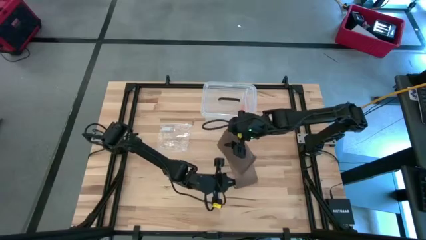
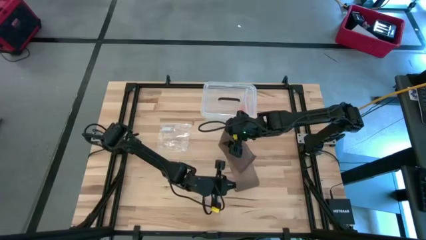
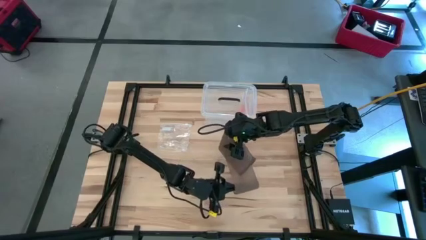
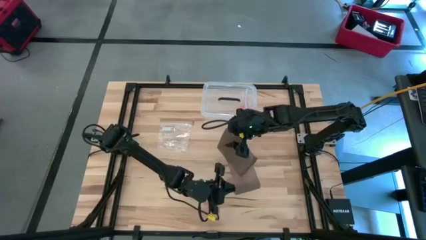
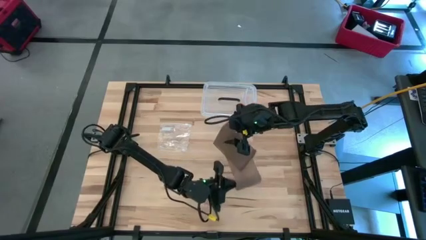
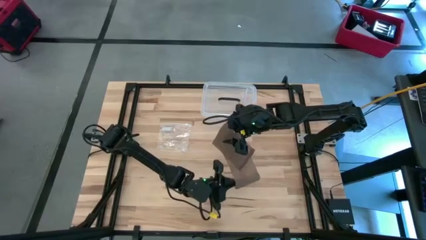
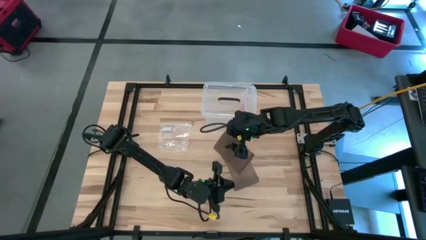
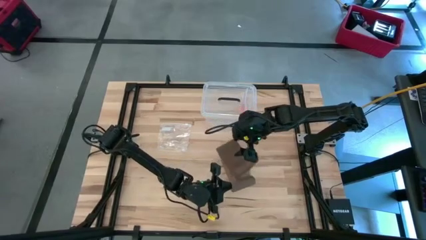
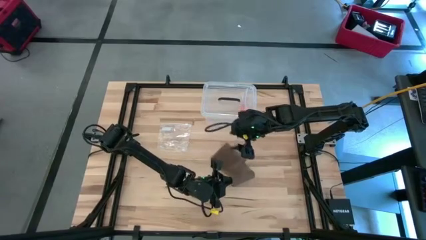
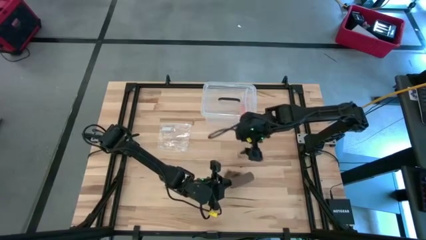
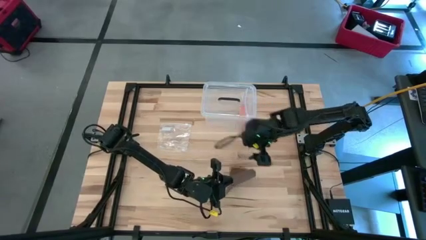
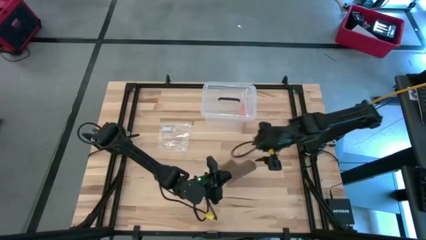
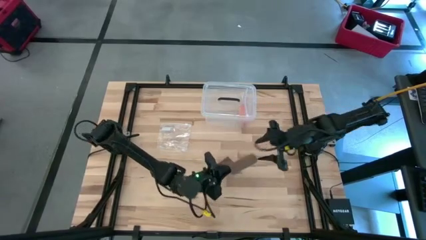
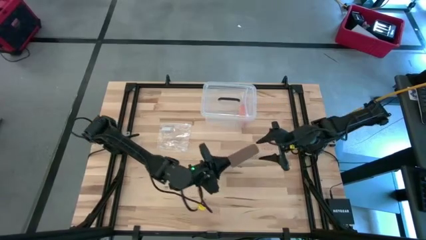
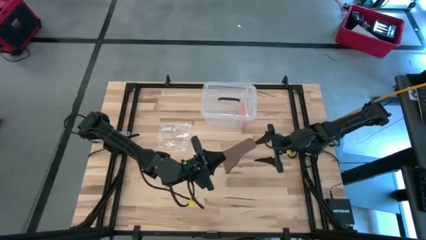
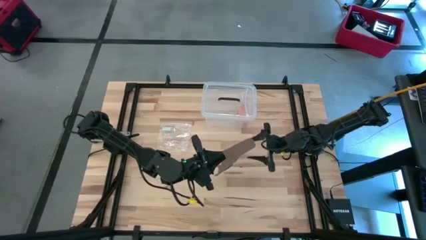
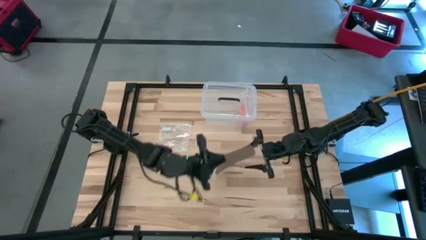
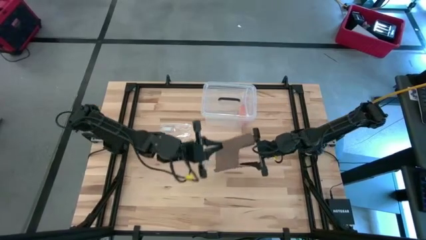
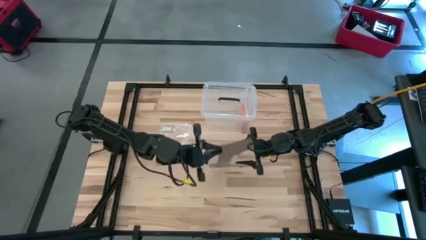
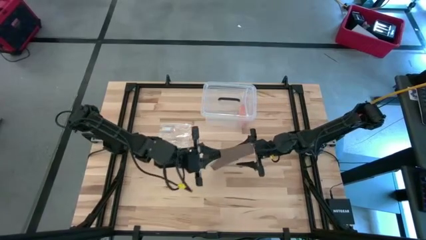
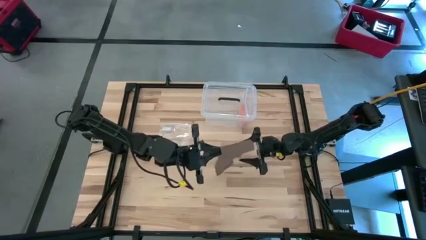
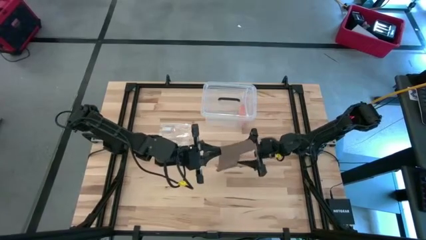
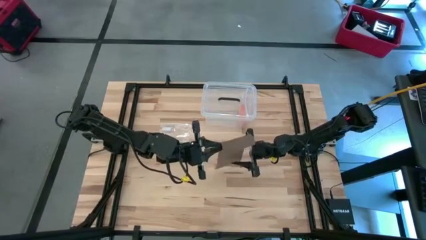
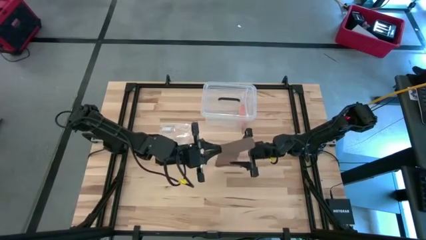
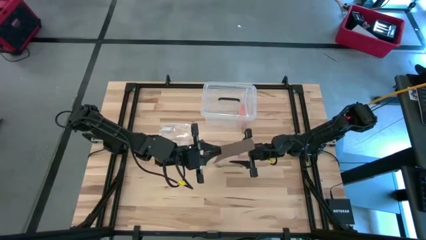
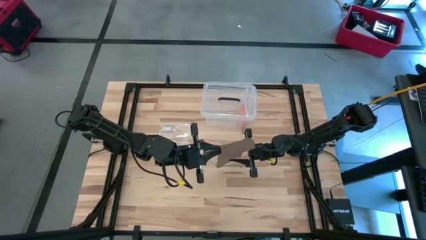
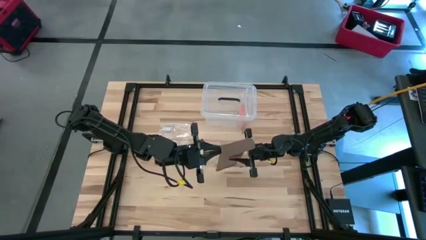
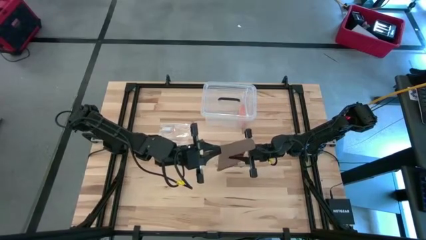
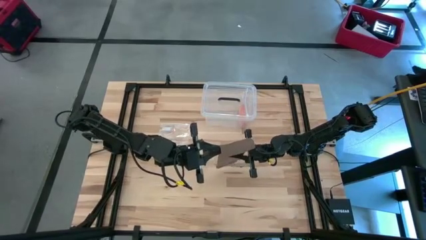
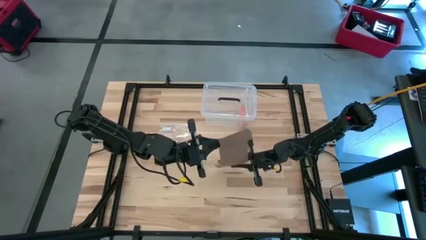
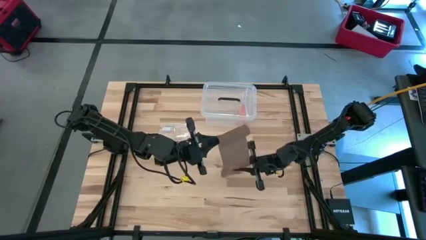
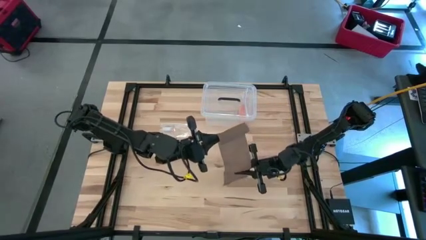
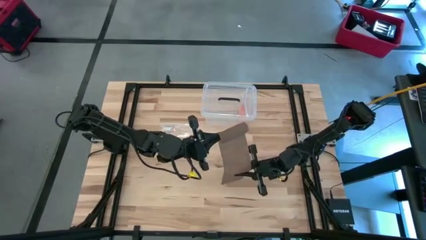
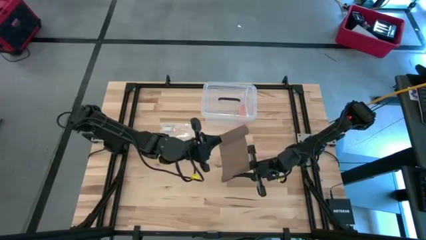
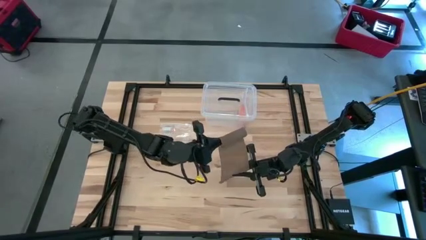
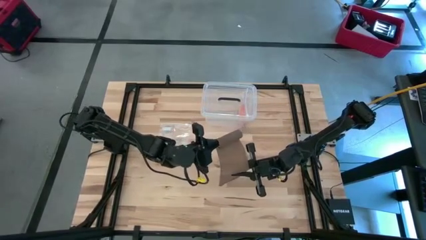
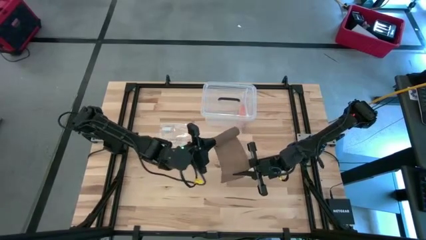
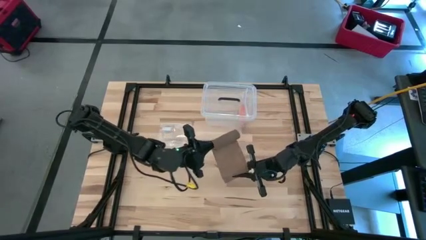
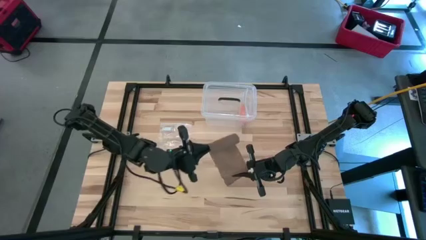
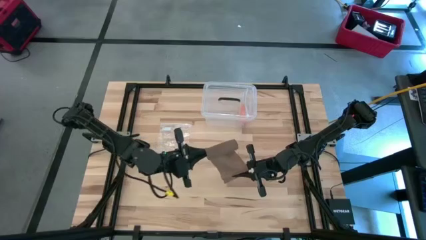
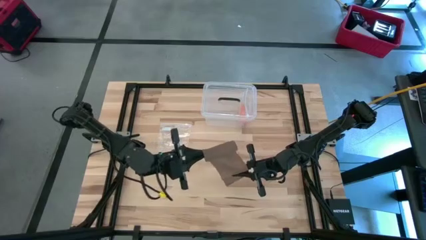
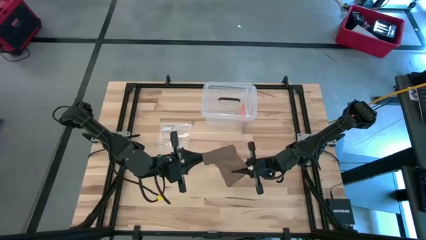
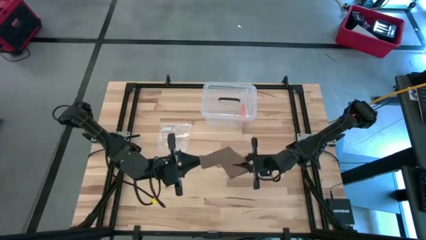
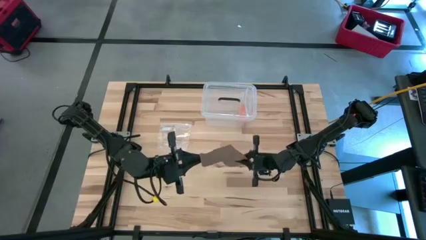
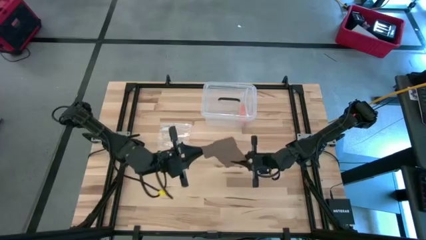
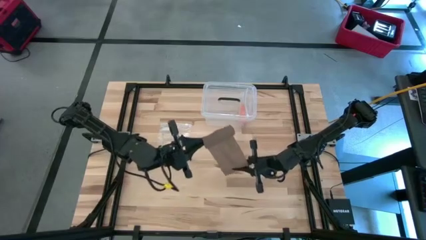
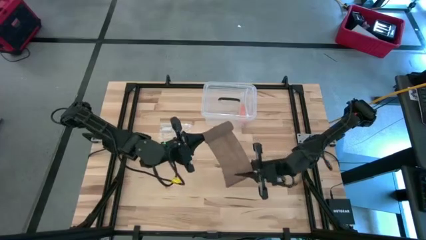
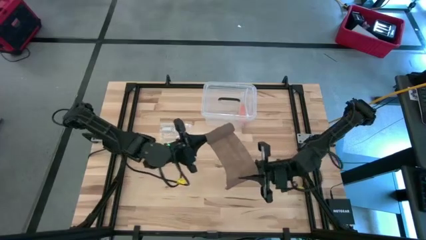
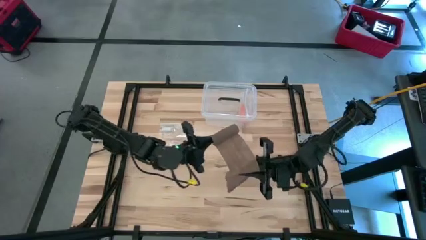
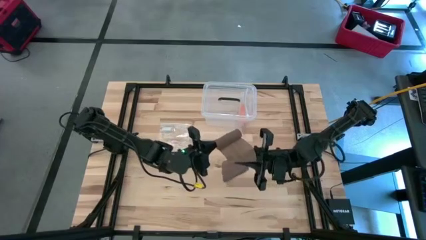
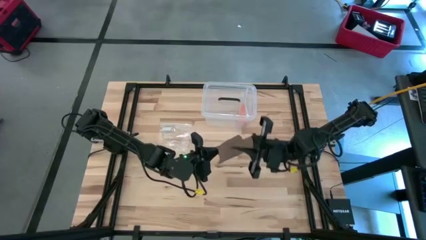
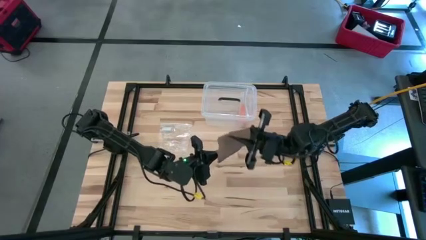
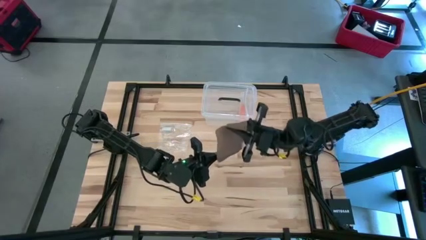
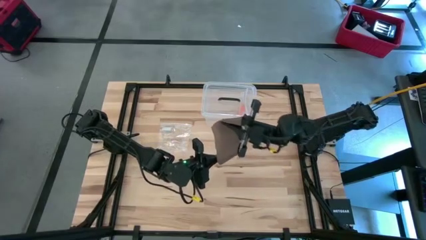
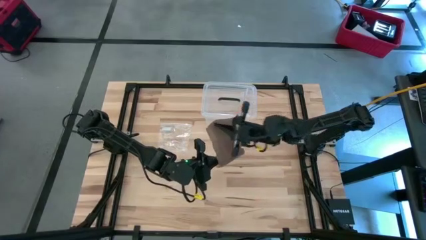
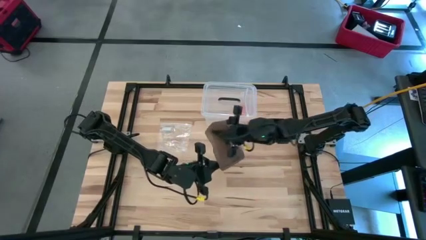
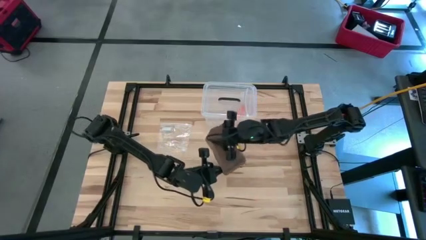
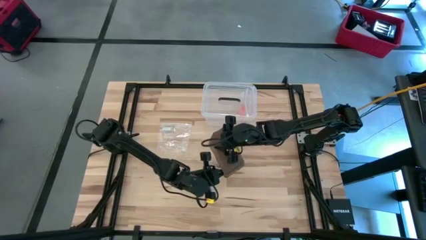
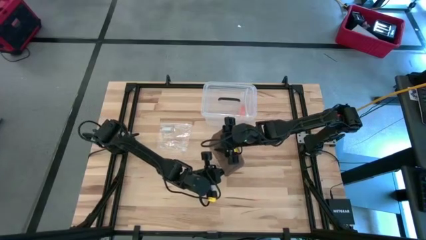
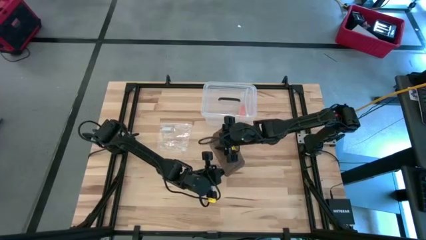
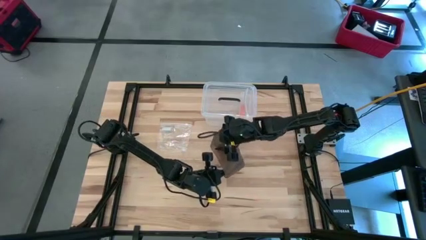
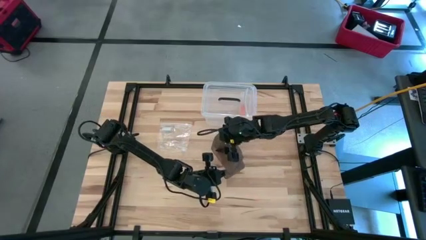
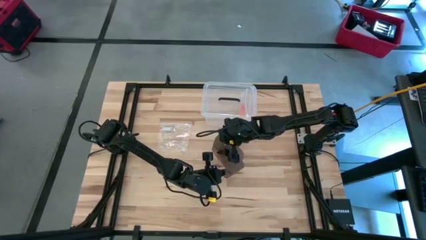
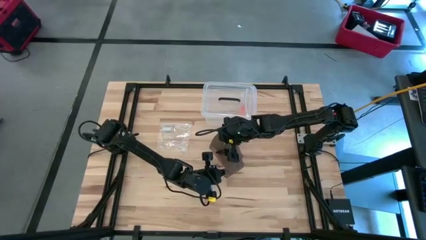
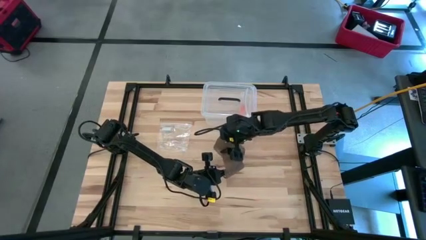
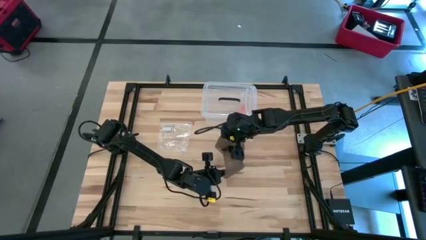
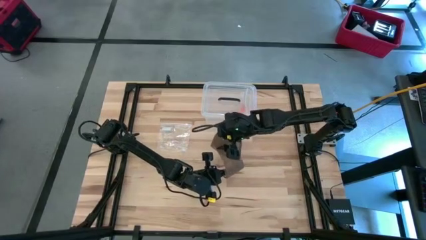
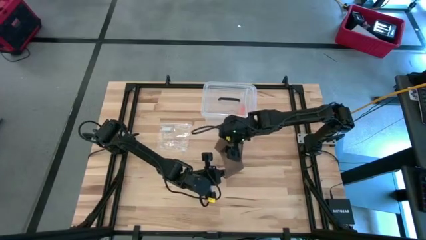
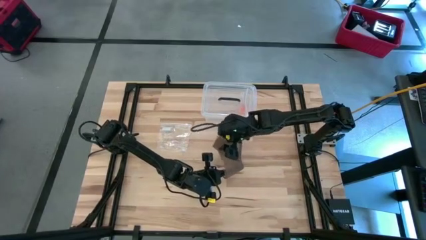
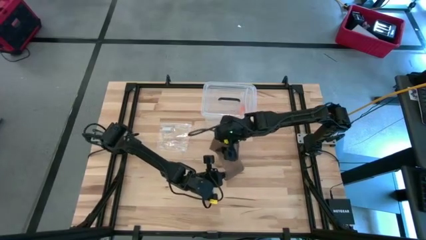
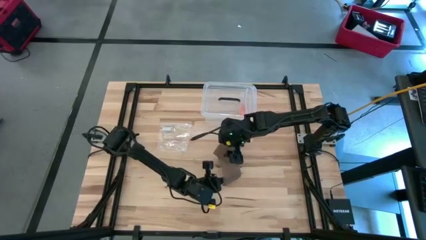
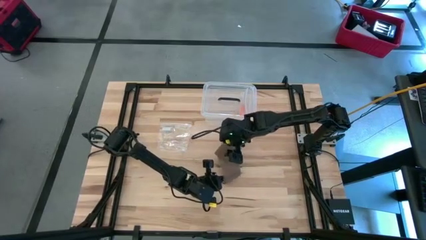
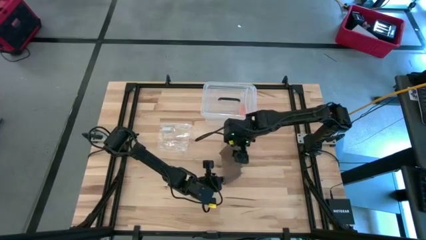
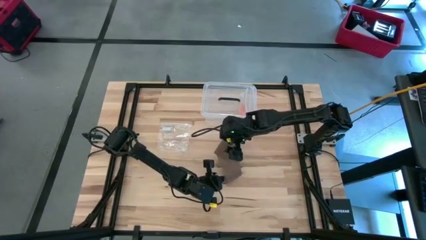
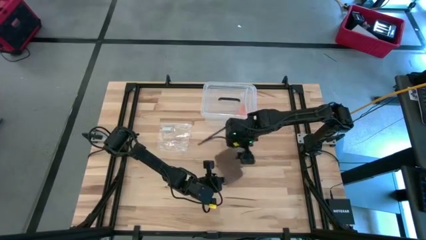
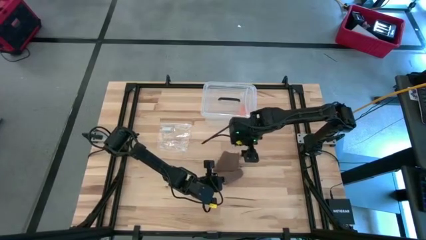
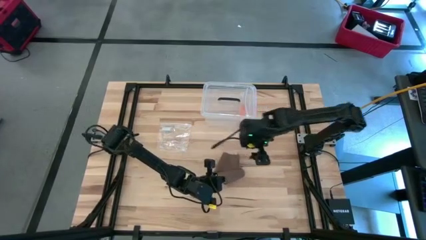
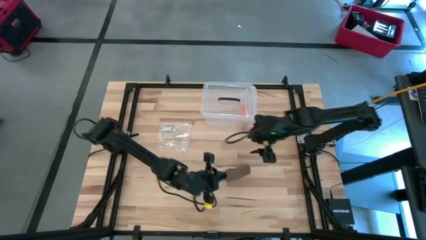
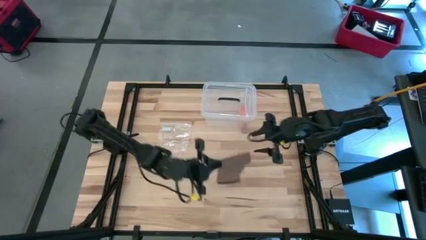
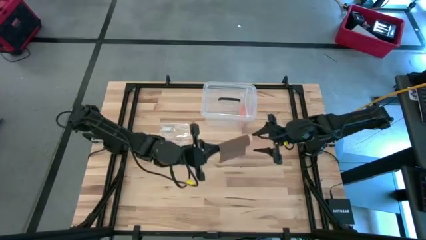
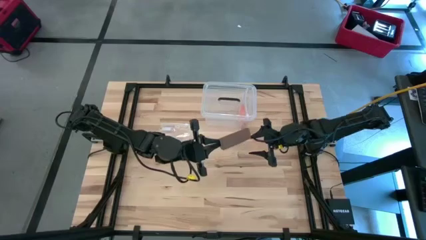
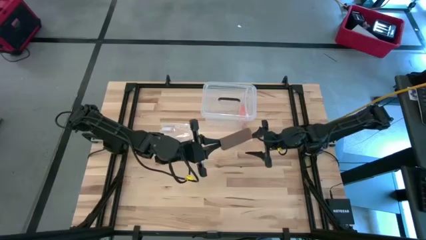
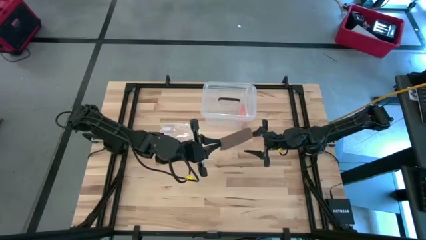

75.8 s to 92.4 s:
Task: Roll bandage
Roll the brown bandage
